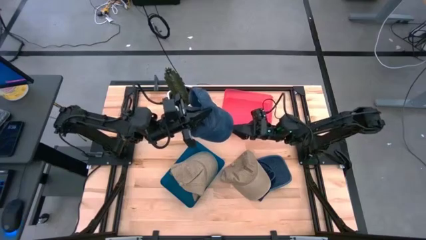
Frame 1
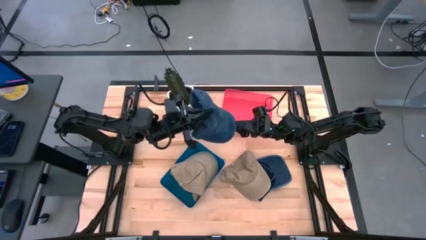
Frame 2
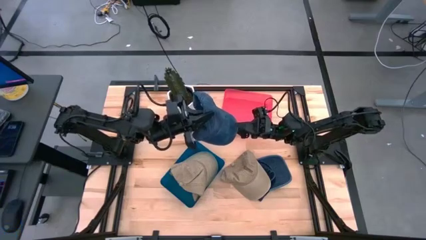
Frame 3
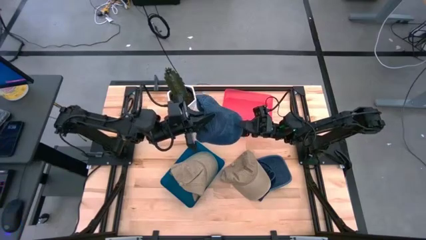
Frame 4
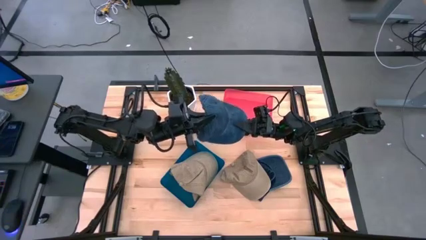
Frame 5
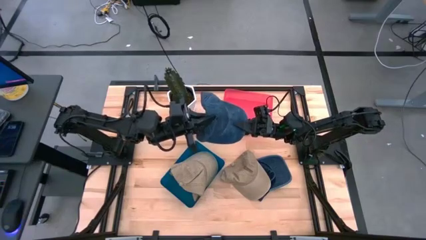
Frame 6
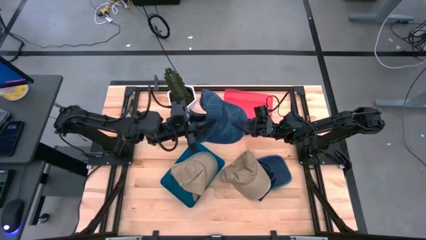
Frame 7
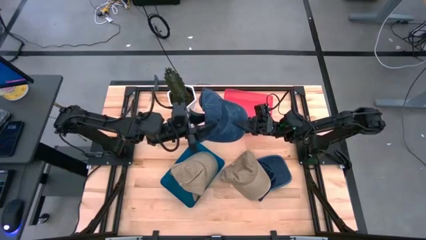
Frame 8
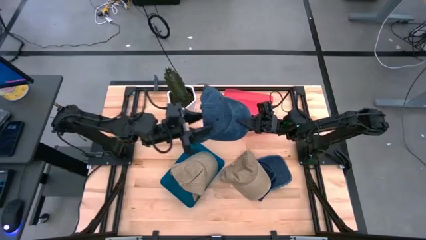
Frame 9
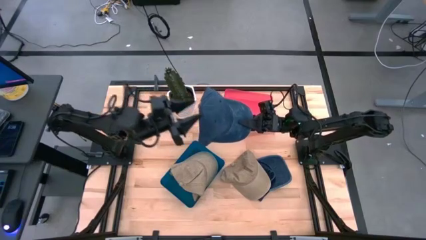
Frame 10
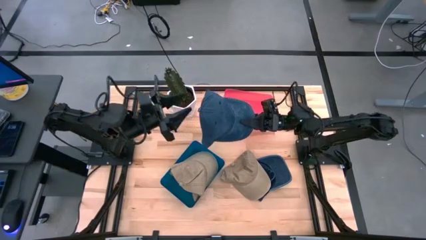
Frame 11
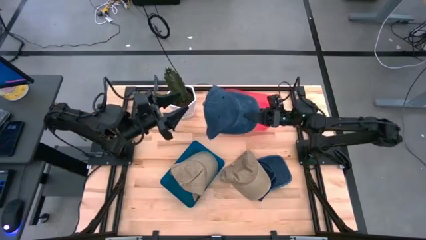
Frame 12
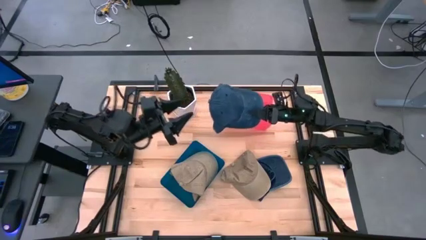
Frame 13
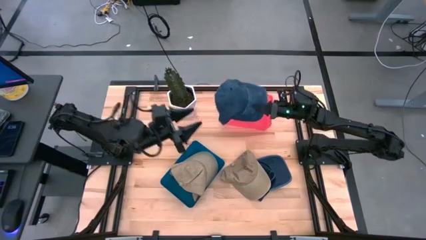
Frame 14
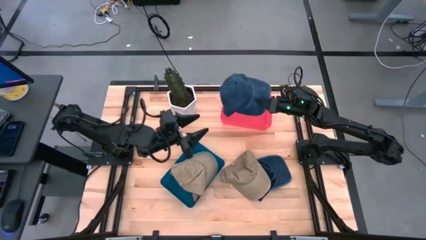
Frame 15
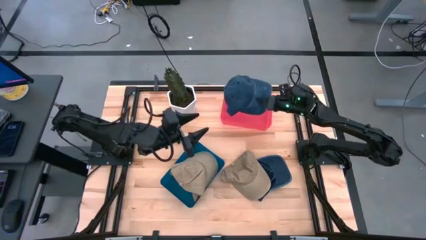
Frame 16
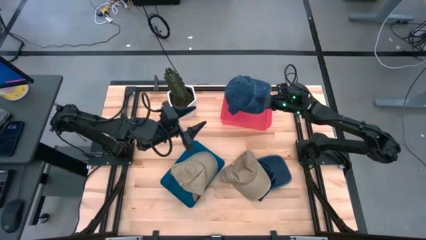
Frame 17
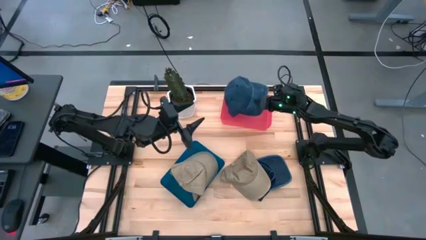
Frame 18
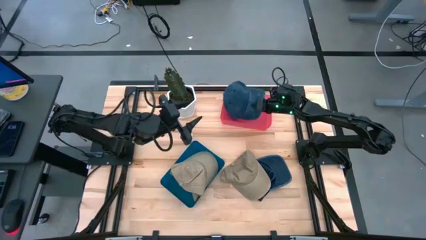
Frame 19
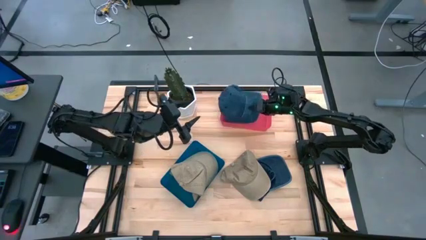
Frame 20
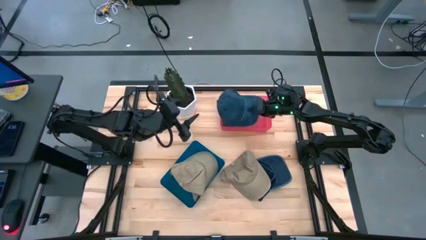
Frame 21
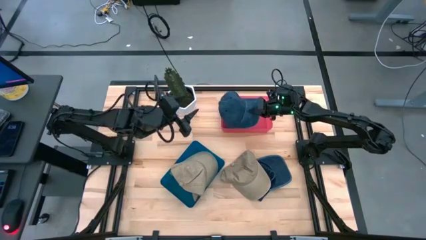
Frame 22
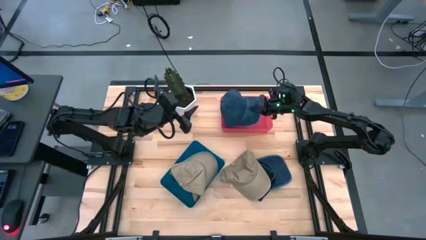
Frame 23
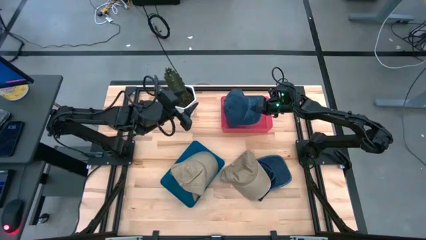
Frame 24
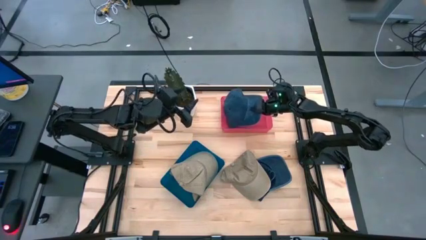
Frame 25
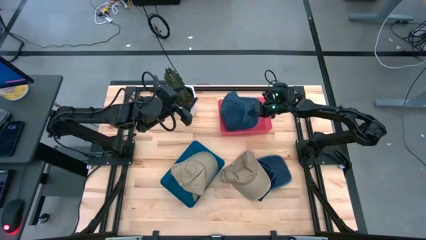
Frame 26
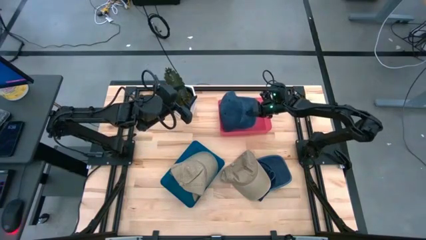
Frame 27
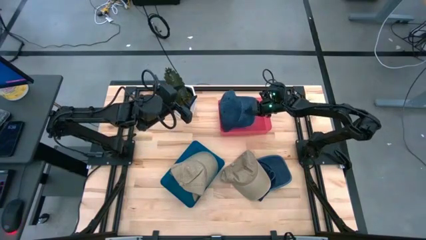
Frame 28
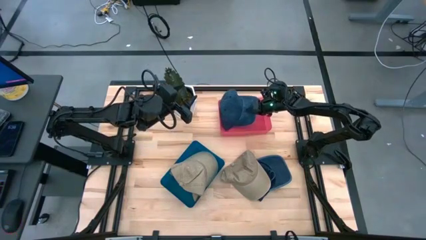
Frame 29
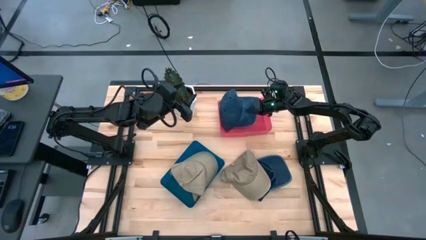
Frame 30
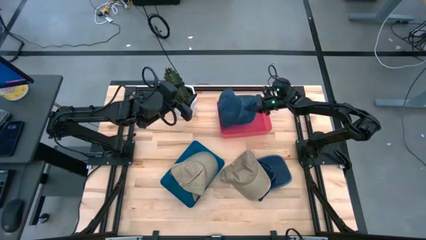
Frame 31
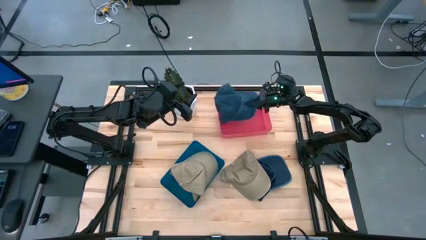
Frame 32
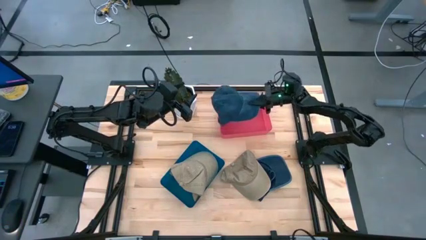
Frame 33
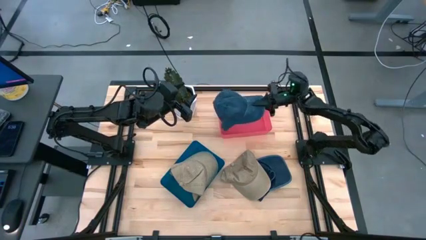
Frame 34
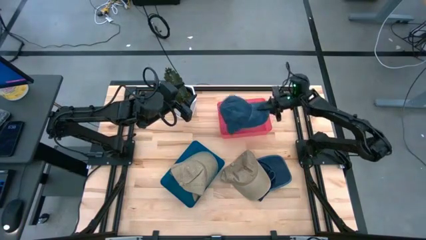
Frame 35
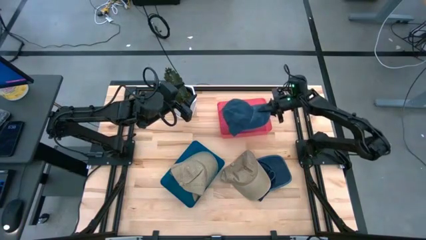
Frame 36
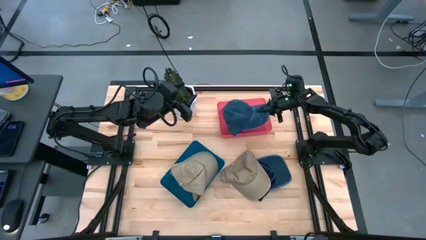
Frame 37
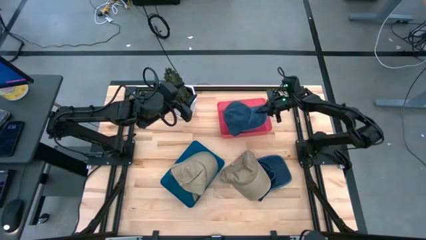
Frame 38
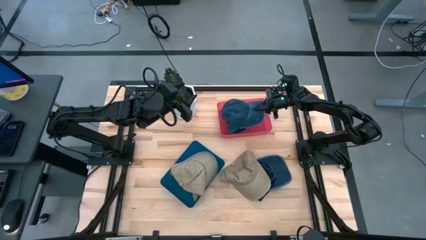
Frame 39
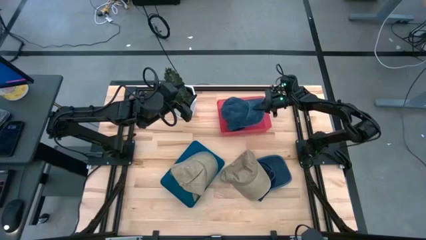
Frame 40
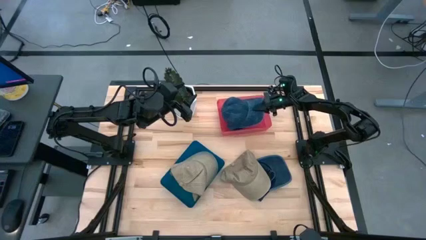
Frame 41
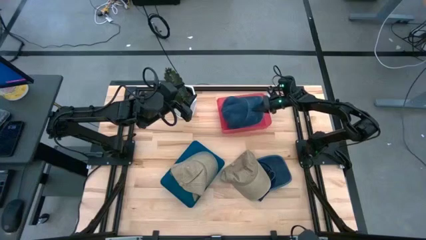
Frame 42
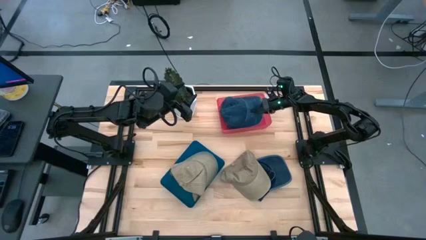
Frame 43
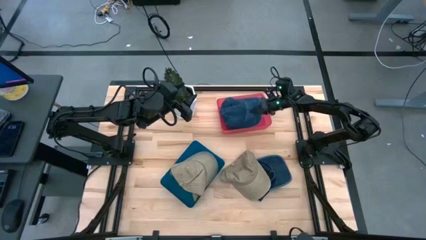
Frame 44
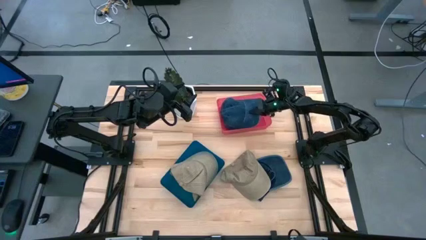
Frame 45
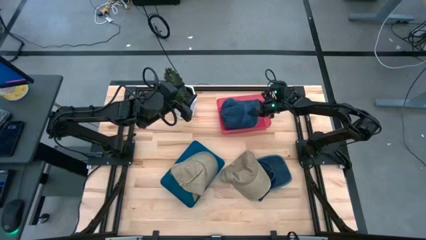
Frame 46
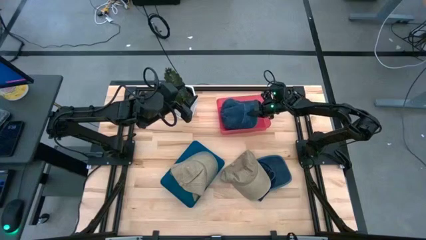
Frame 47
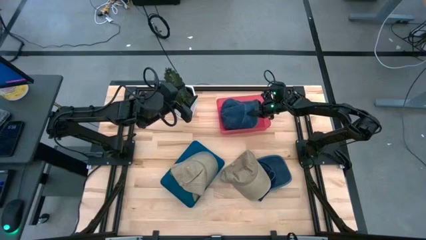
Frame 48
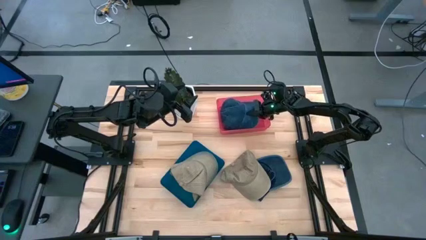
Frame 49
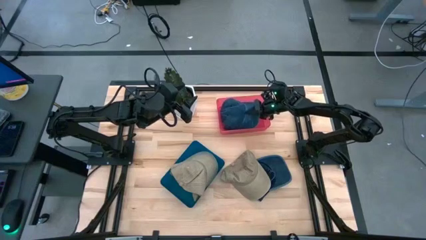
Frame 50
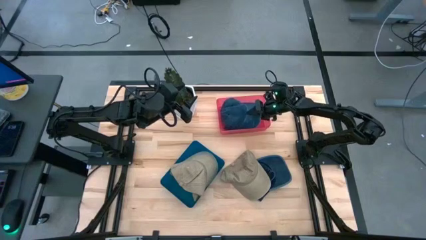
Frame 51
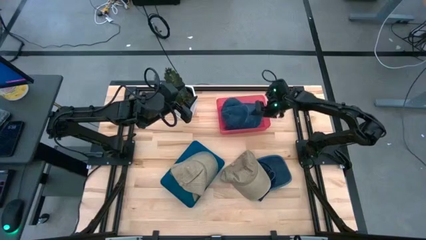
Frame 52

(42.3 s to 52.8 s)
Task: Pick & Place hat
Put the blue cap into the red bin

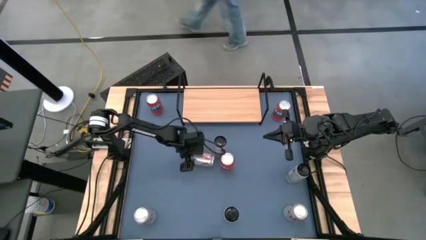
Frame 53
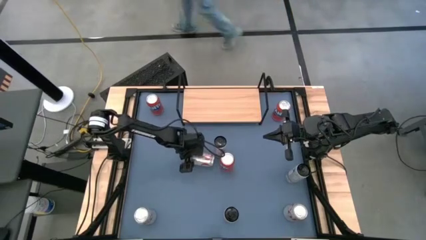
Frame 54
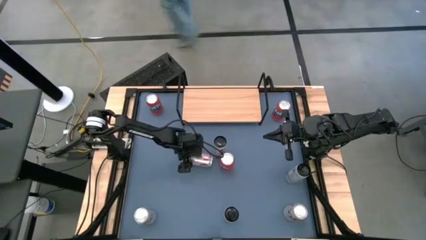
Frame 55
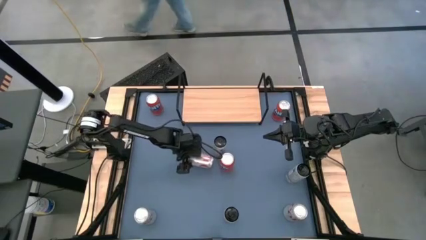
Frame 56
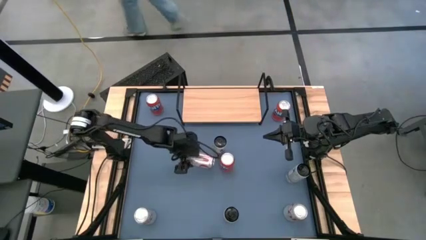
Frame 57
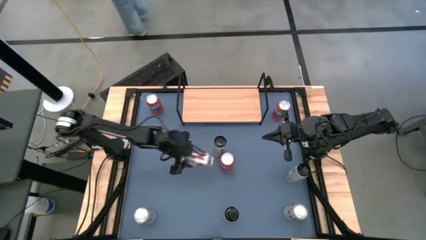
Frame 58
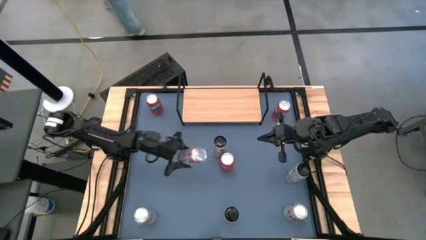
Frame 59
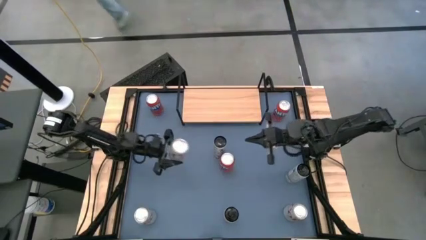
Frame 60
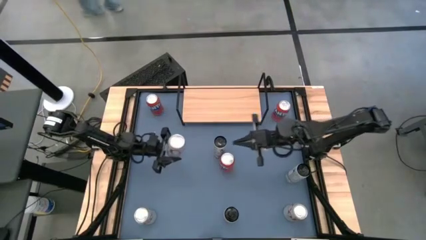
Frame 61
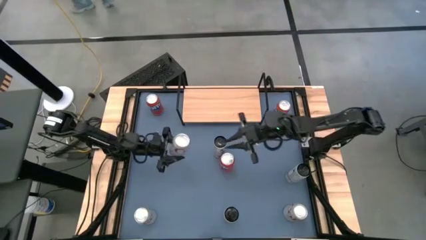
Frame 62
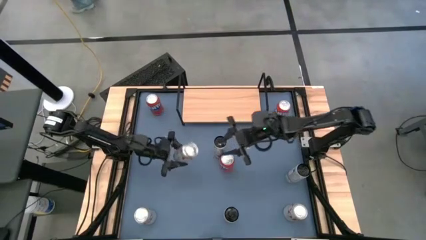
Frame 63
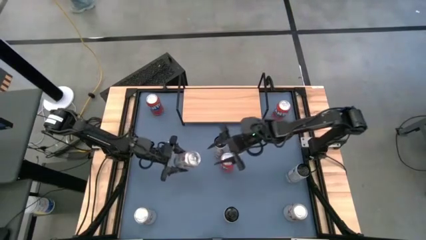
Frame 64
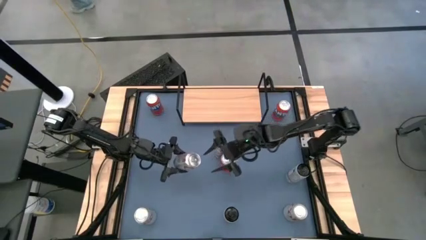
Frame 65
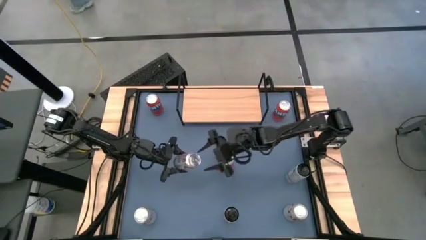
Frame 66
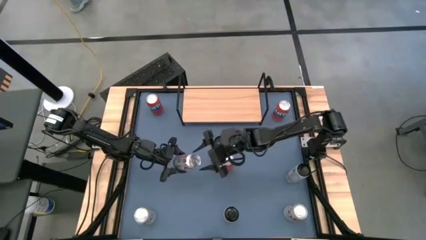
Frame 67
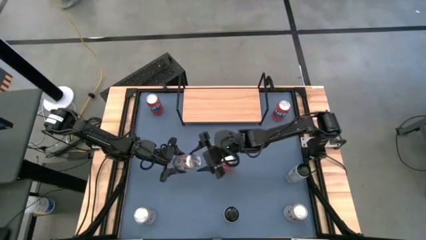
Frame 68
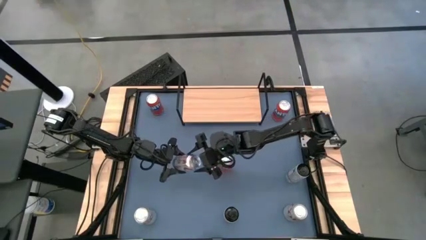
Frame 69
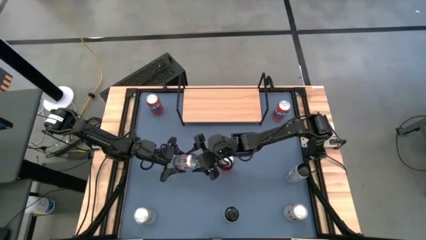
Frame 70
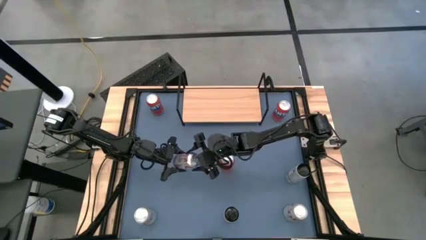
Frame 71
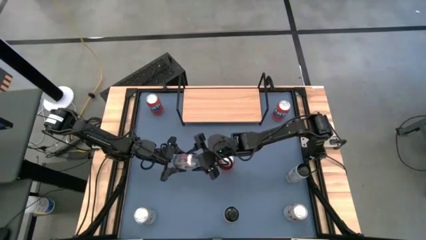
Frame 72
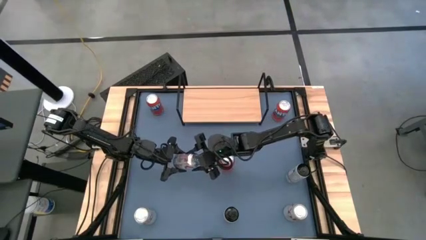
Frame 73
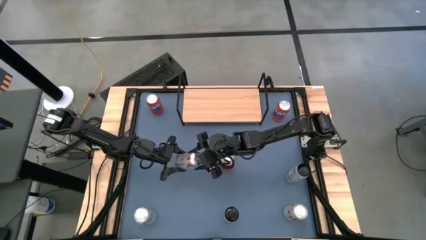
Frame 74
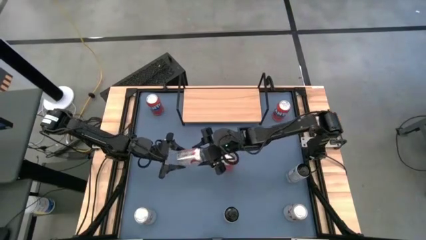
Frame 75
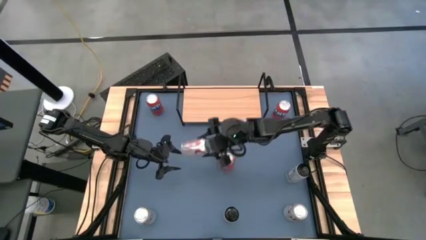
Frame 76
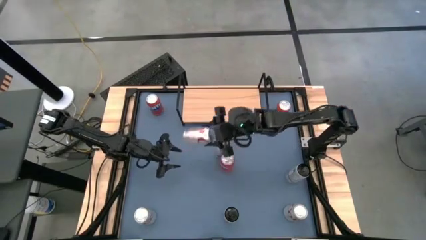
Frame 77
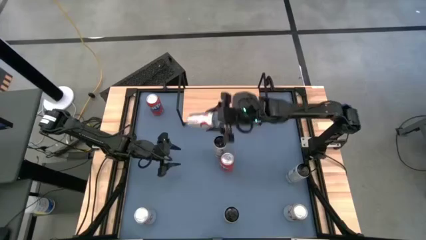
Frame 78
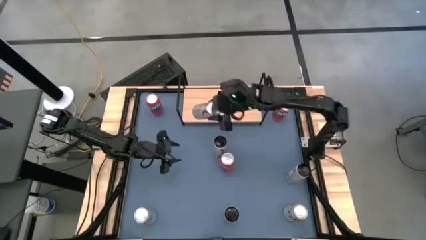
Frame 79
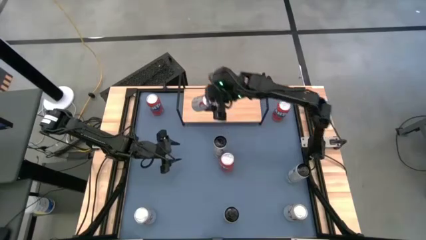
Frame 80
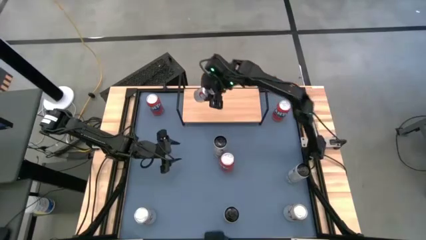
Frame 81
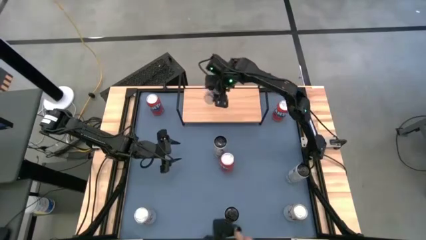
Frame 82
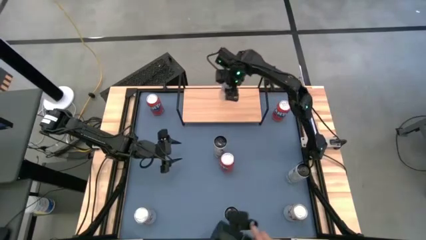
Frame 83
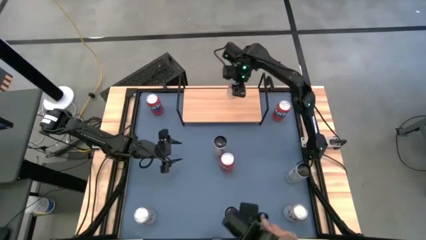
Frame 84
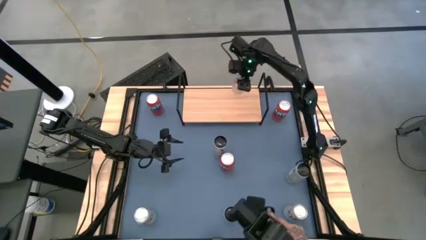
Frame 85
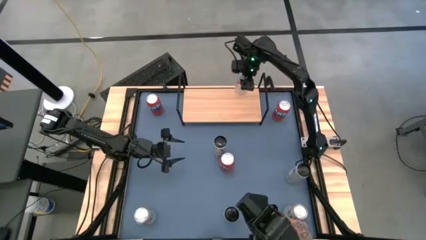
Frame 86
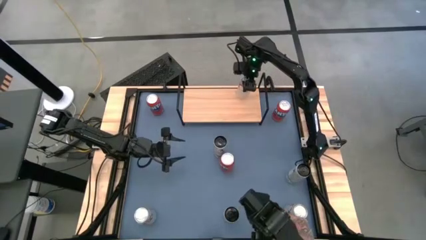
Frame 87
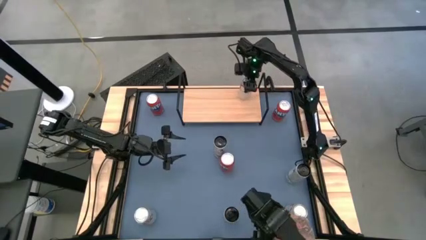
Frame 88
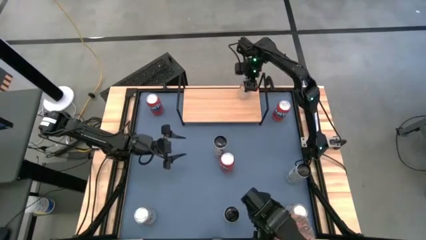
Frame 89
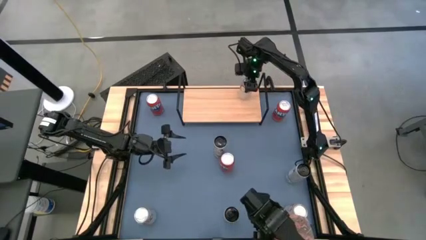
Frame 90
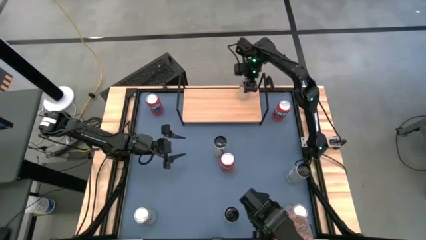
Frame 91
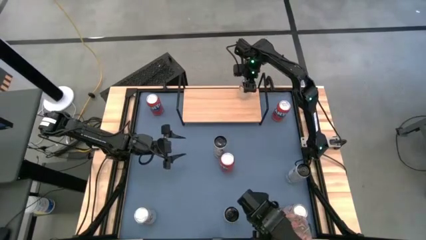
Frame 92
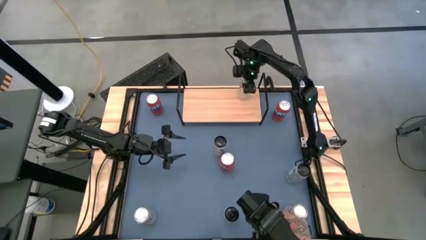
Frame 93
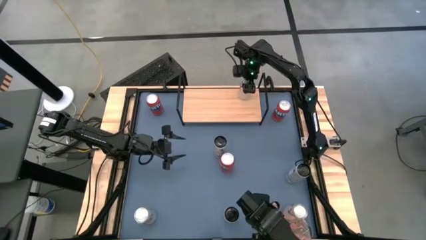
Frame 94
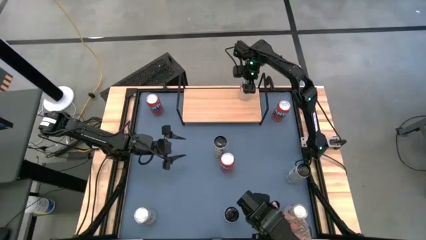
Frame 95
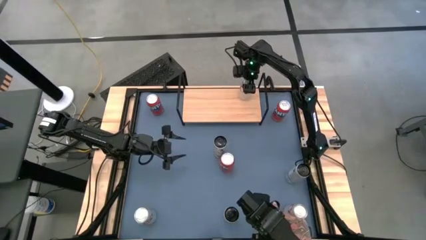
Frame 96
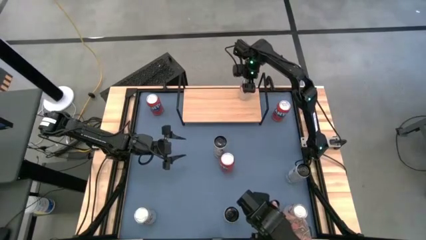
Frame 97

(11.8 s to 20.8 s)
Task: Place canned beverage on shelf
Put the top left silver soda can on the shelf
